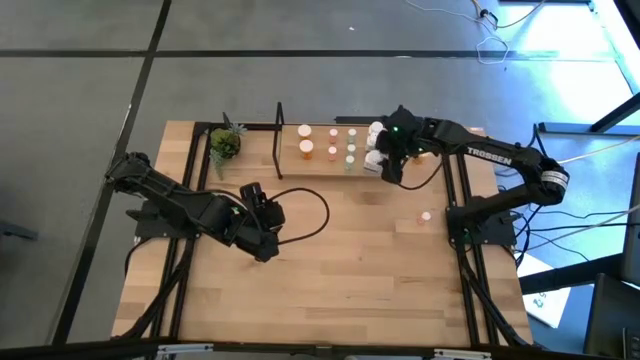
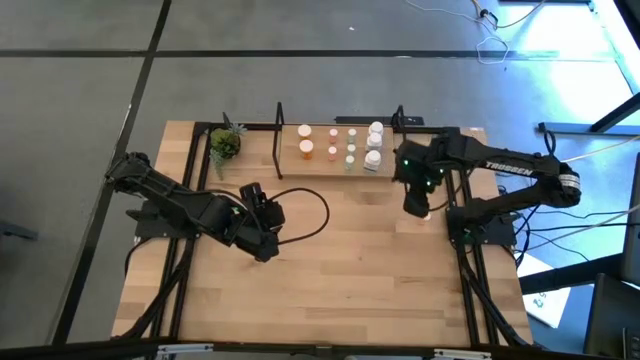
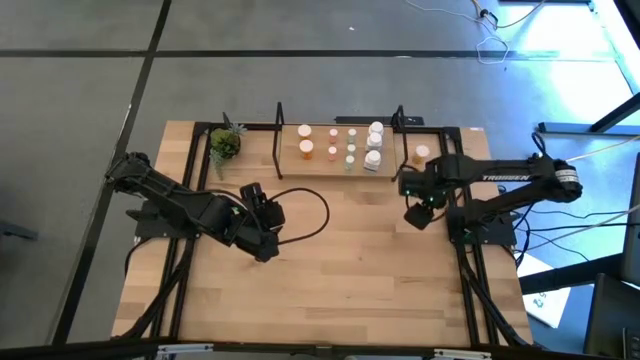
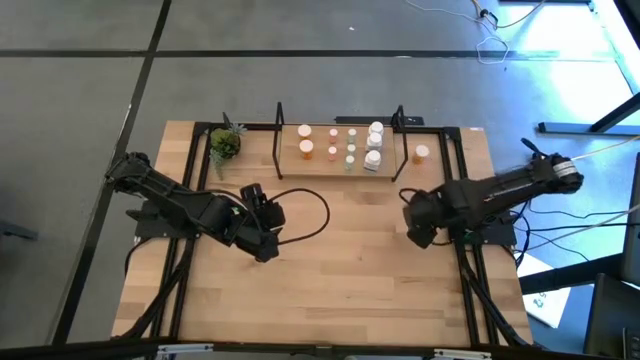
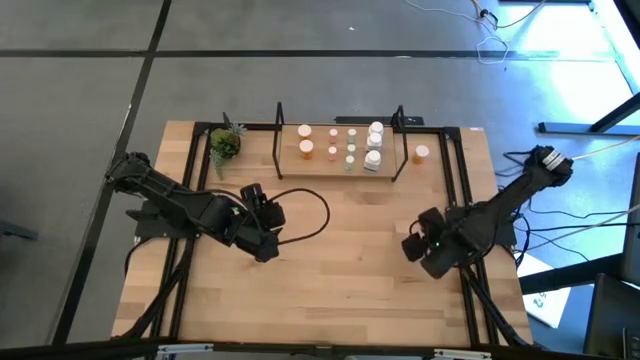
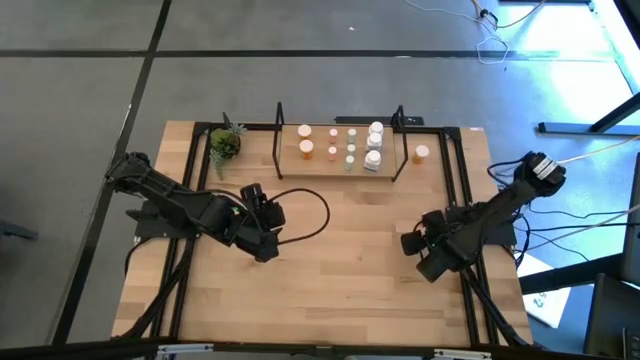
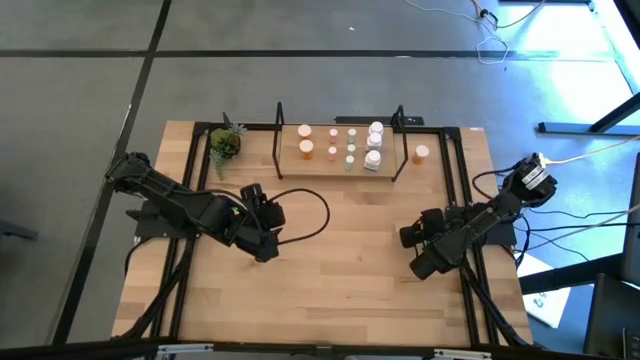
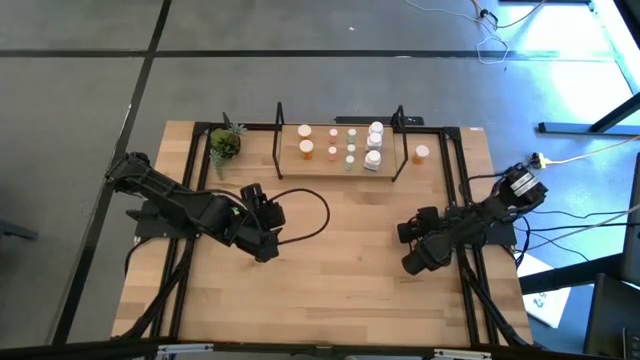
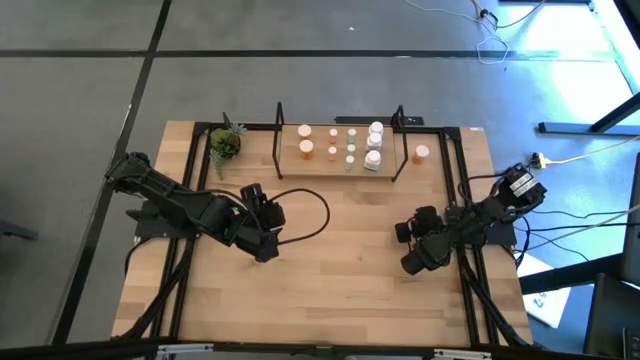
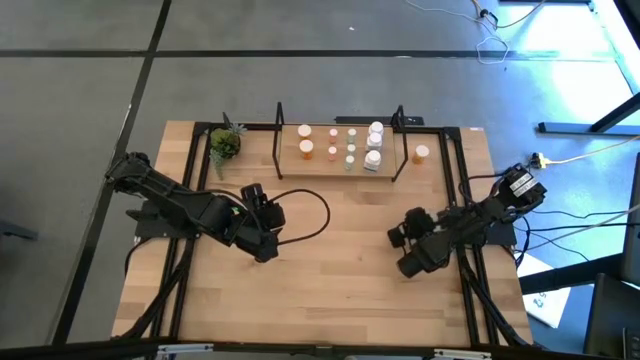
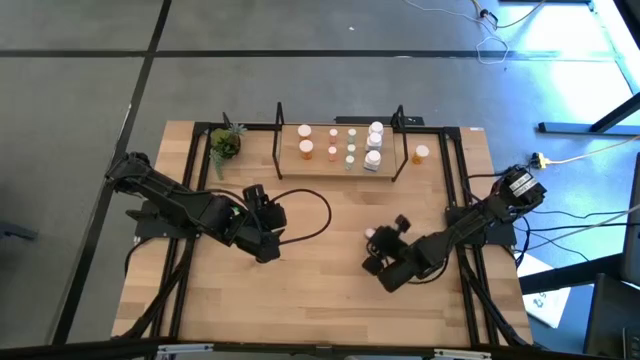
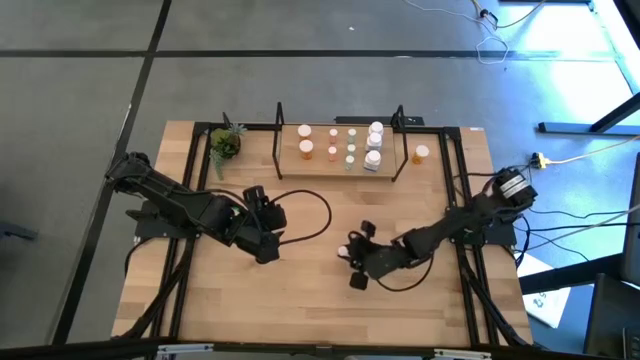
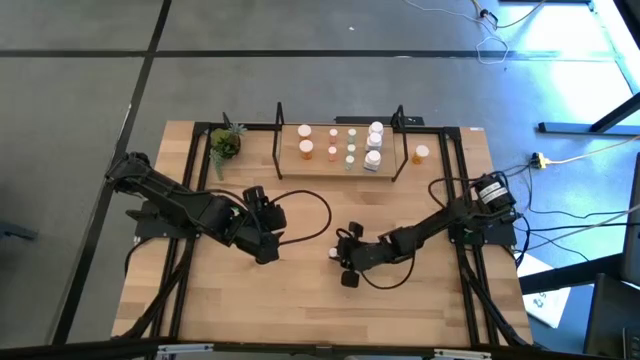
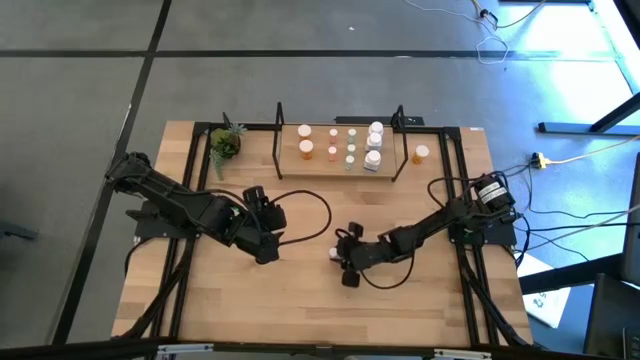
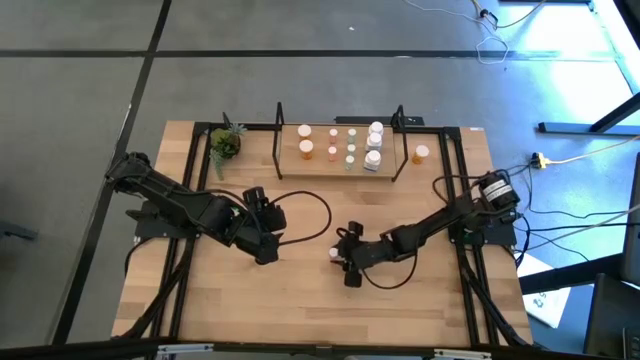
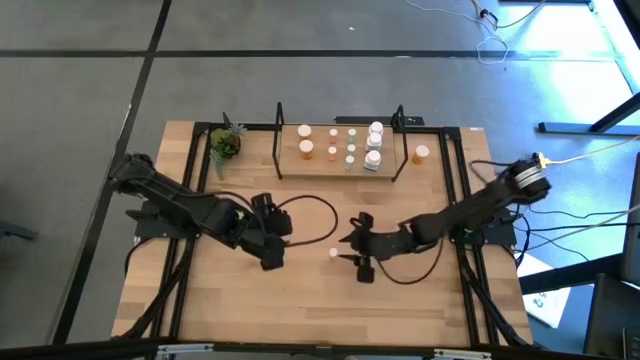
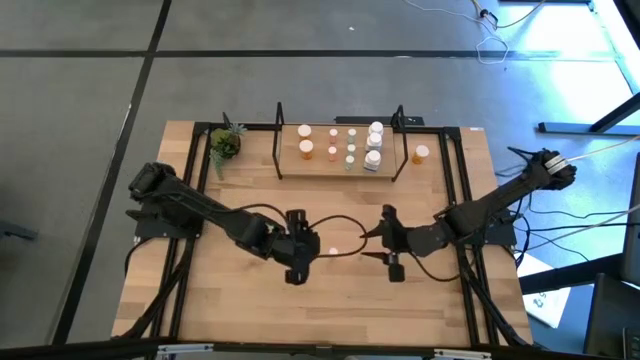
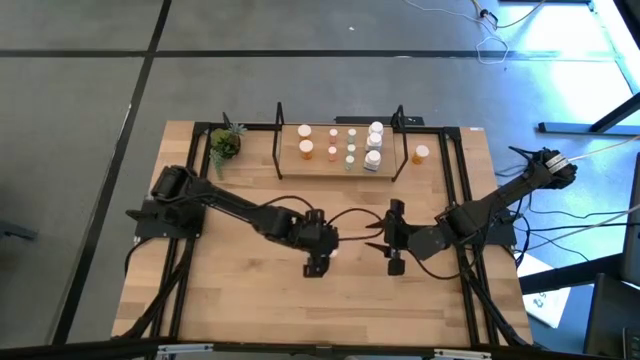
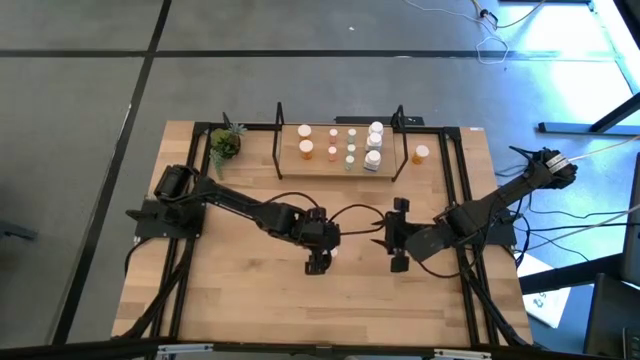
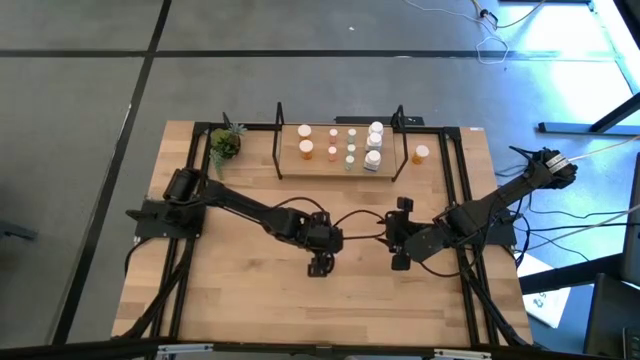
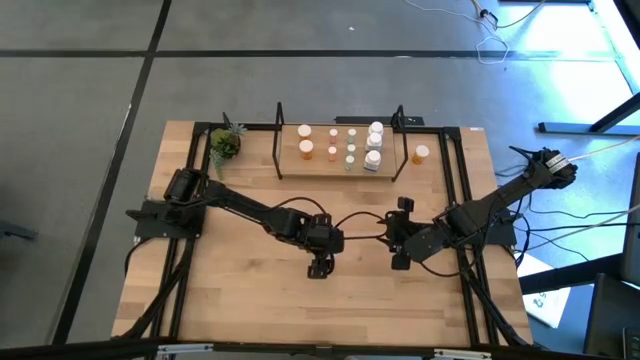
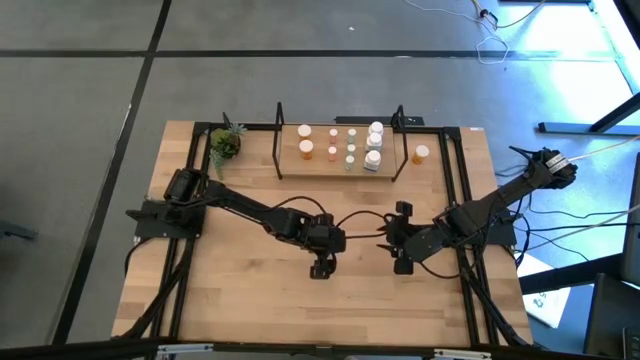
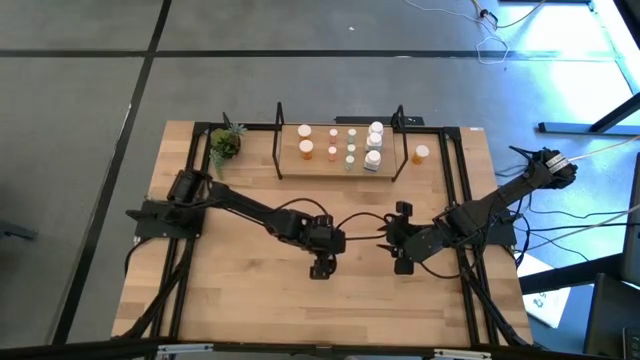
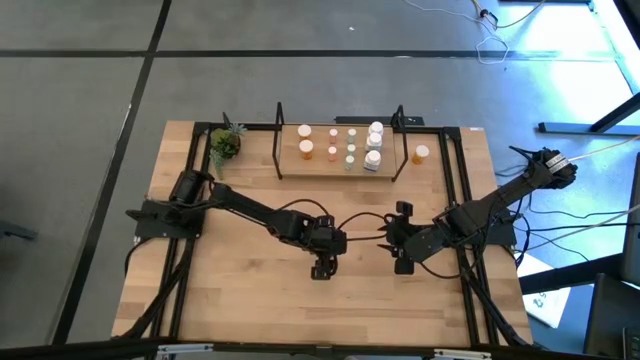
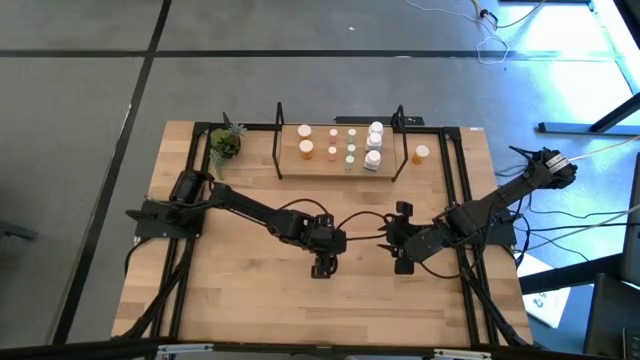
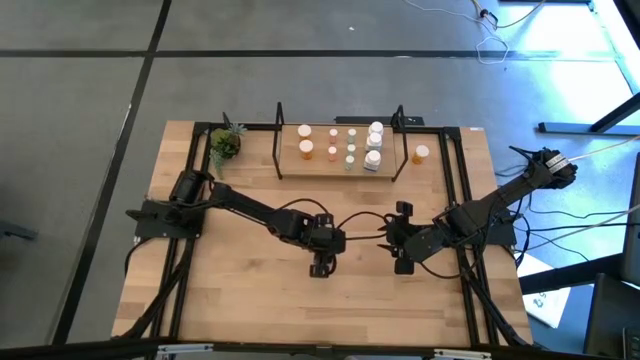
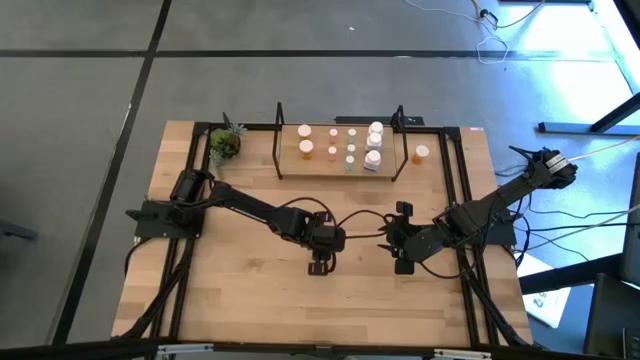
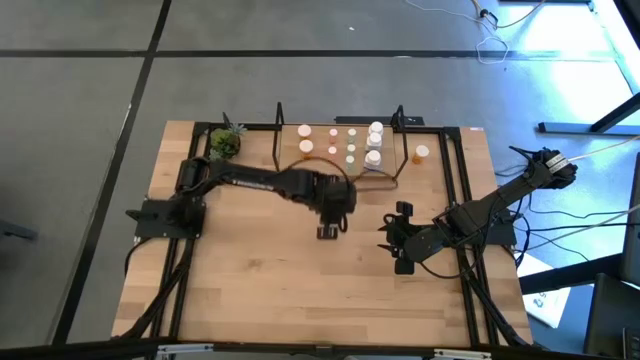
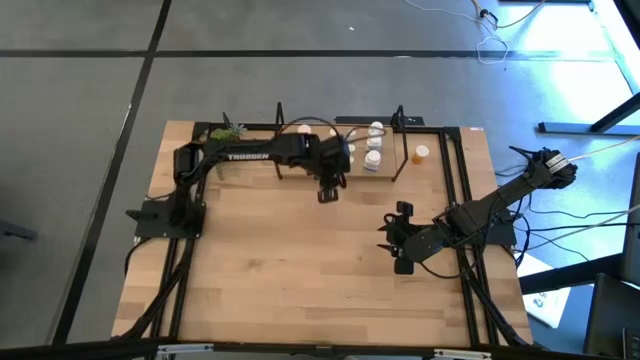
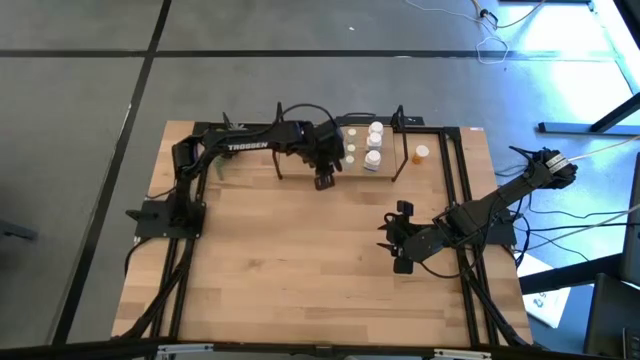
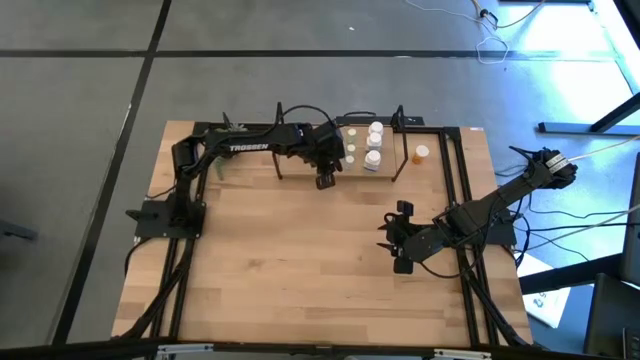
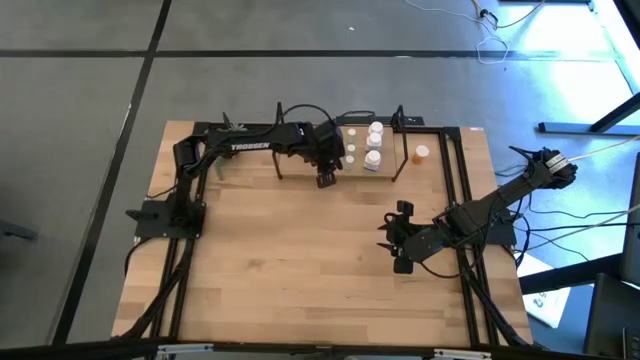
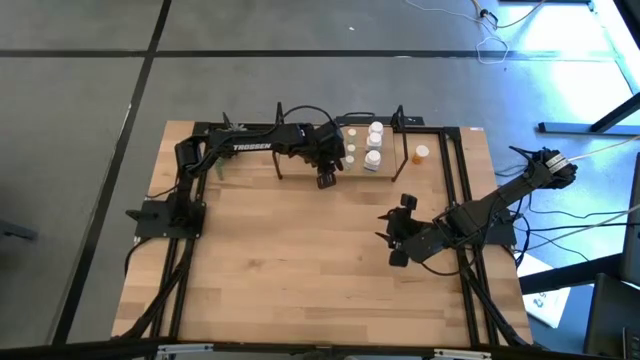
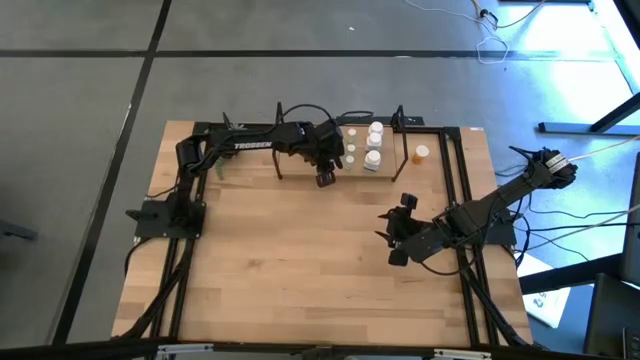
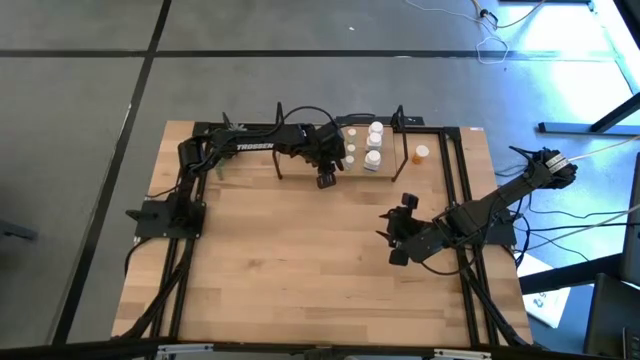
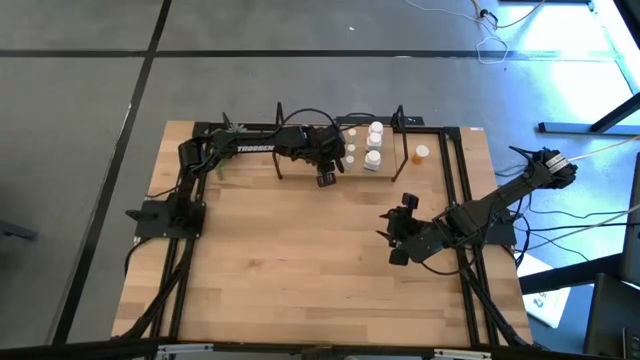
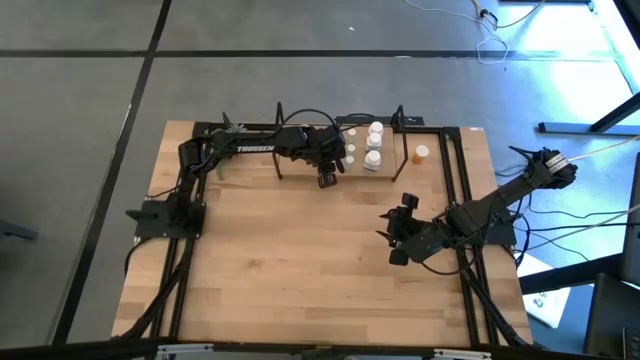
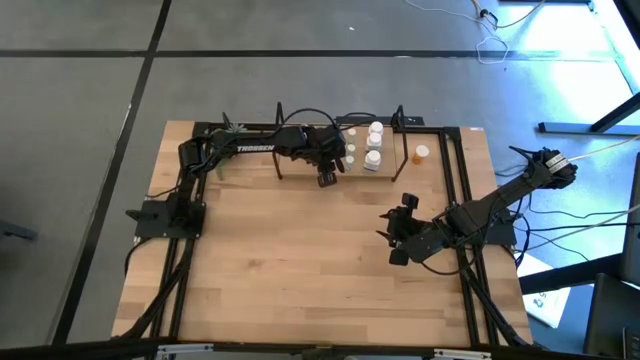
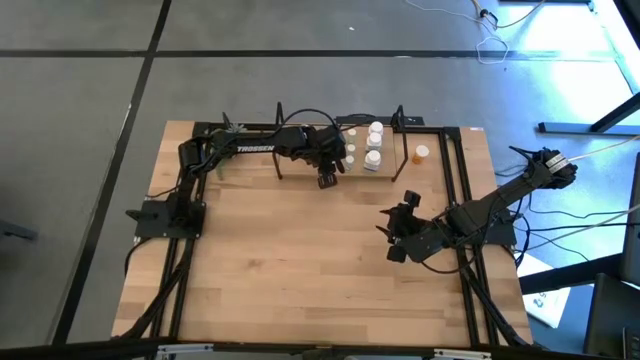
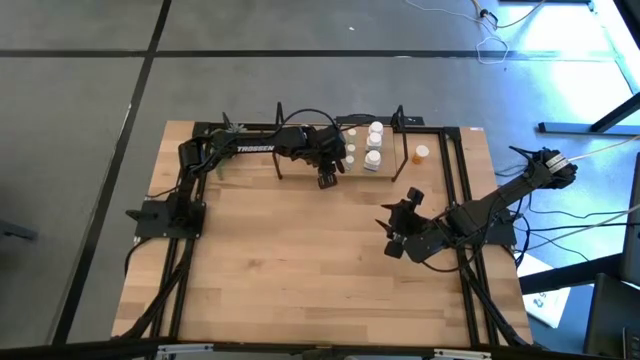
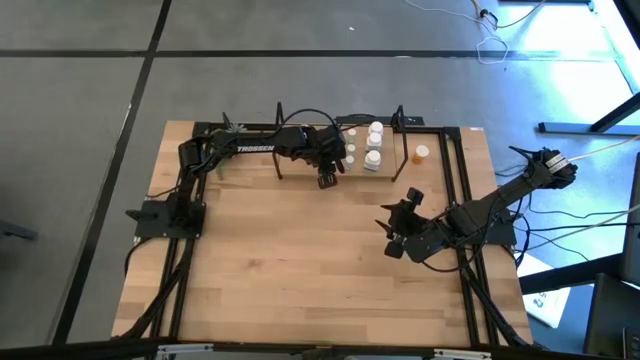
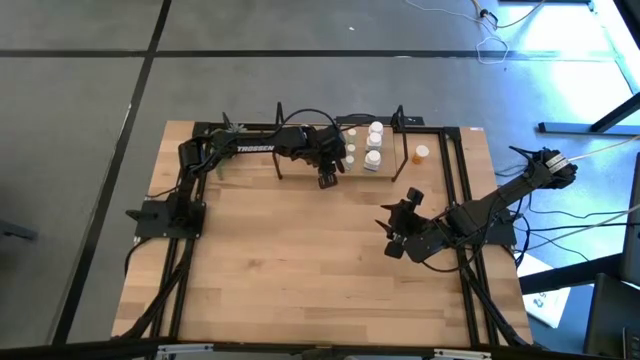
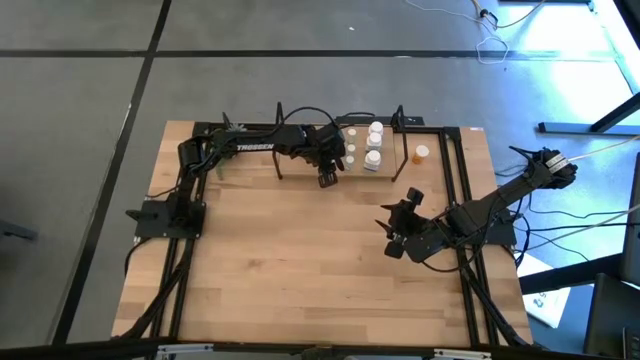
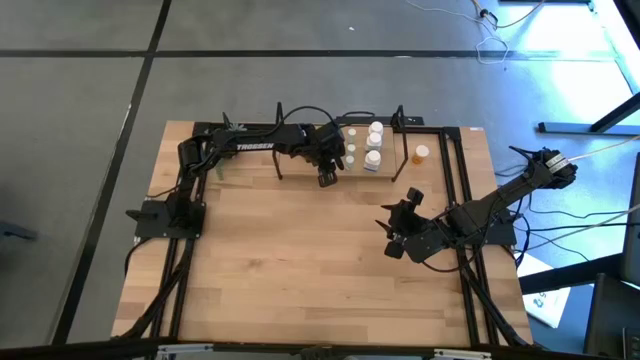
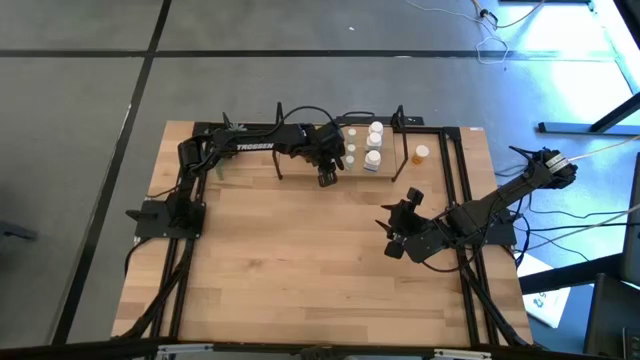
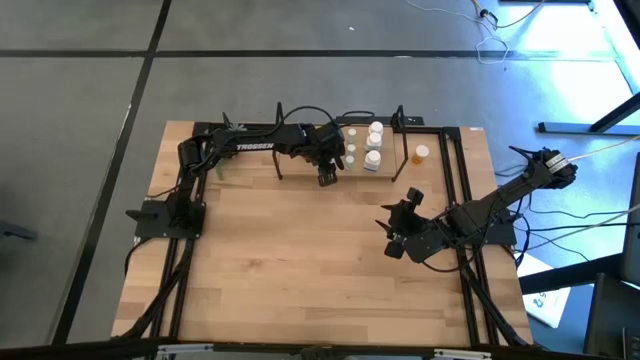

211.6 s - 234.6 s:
Task: Pick and place medicine bottles onto shelf by color
Put the pink pill bottle on the shelf aligned with the pink bottles
